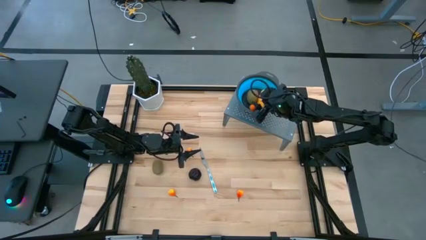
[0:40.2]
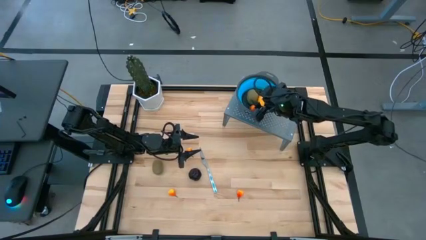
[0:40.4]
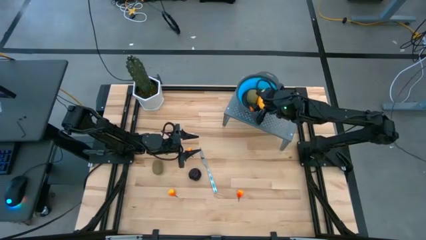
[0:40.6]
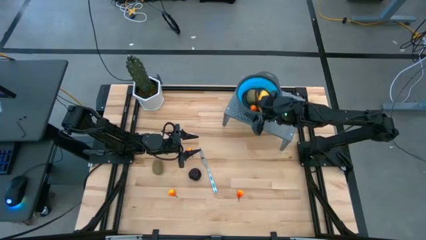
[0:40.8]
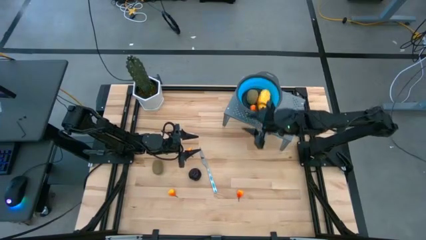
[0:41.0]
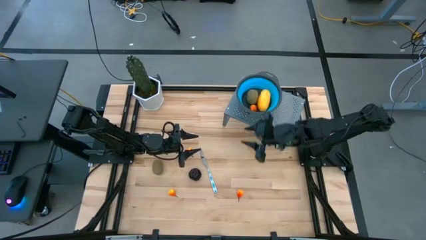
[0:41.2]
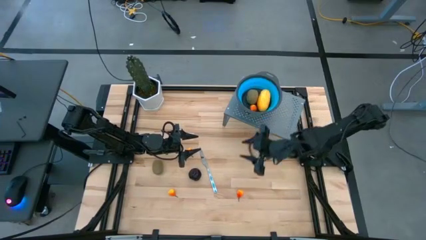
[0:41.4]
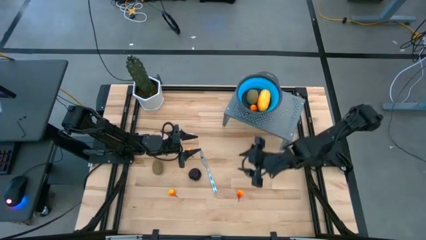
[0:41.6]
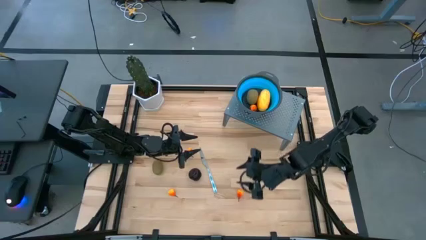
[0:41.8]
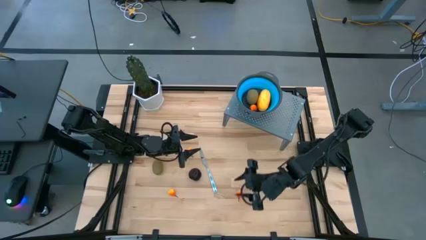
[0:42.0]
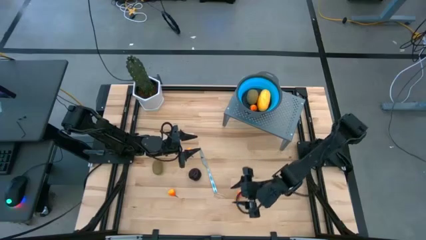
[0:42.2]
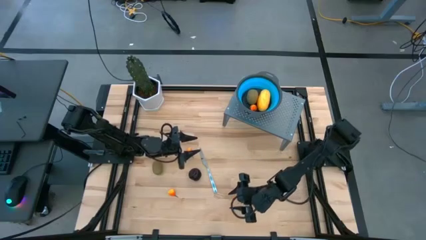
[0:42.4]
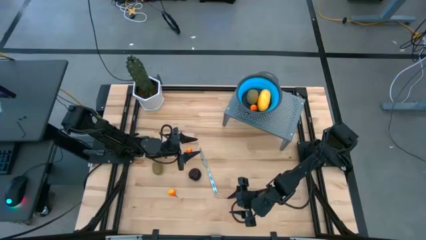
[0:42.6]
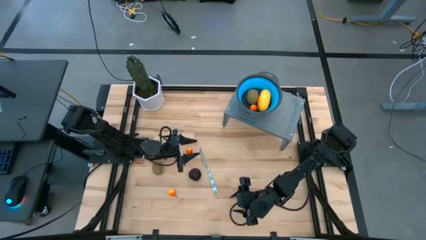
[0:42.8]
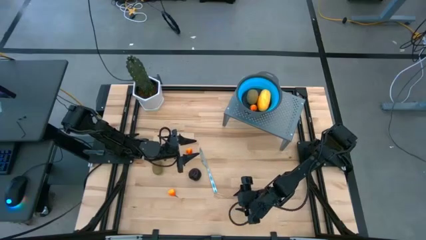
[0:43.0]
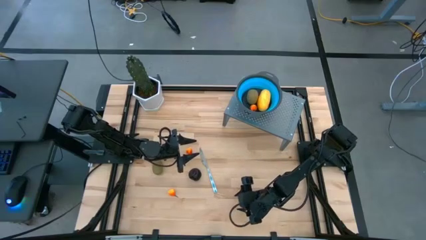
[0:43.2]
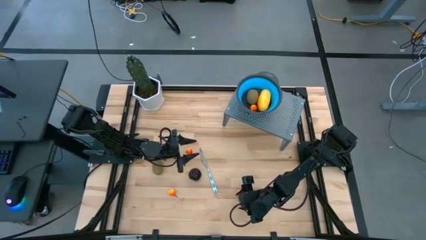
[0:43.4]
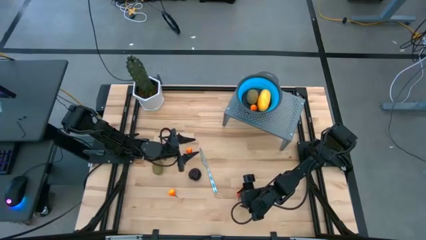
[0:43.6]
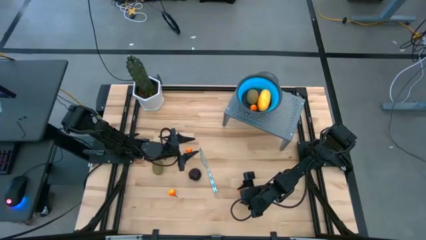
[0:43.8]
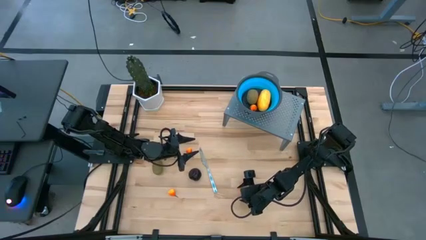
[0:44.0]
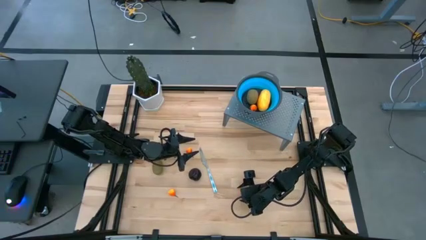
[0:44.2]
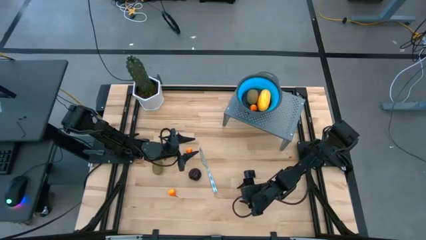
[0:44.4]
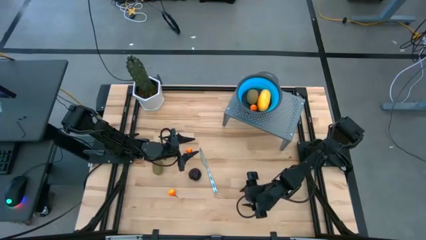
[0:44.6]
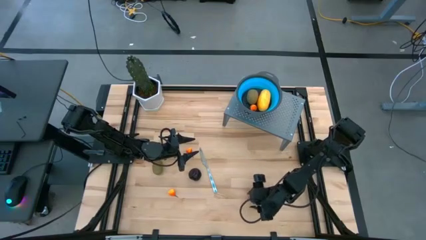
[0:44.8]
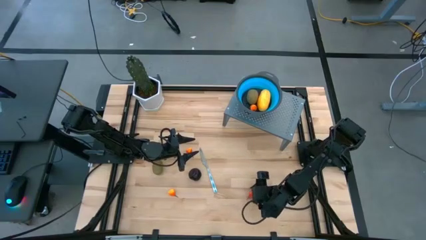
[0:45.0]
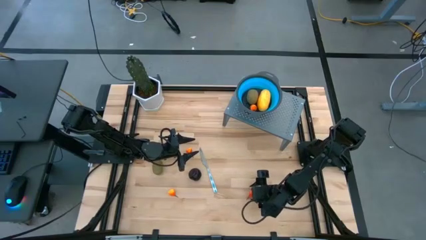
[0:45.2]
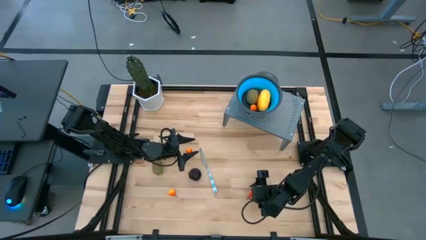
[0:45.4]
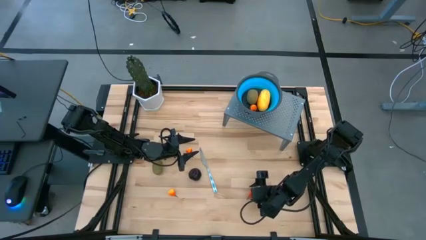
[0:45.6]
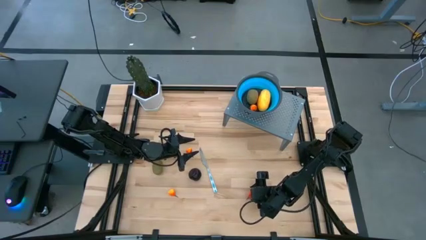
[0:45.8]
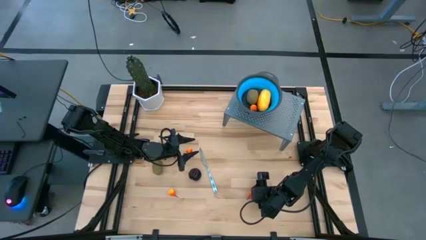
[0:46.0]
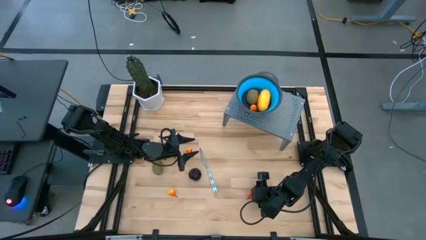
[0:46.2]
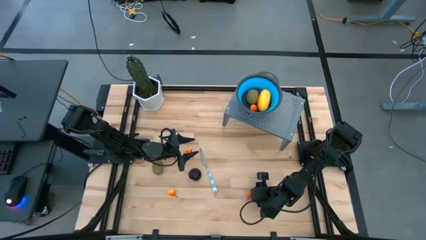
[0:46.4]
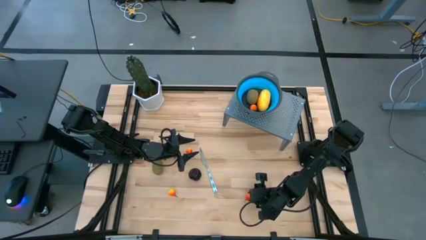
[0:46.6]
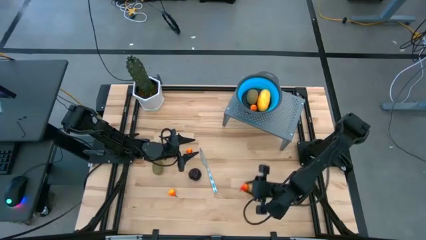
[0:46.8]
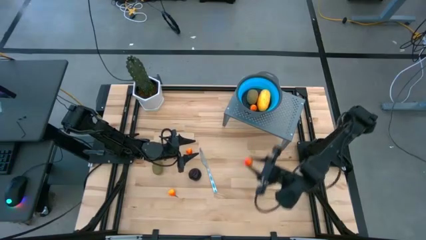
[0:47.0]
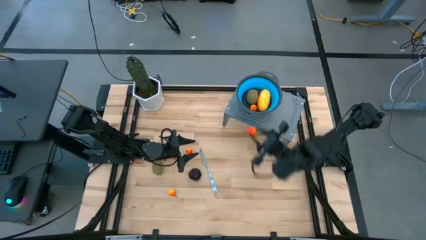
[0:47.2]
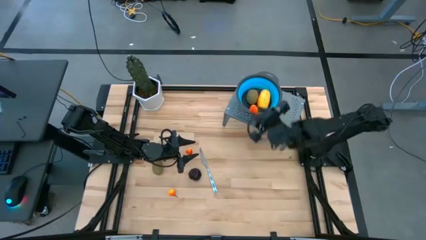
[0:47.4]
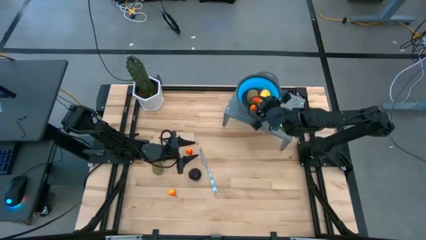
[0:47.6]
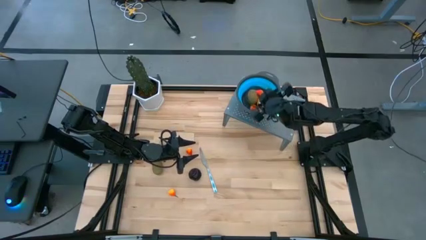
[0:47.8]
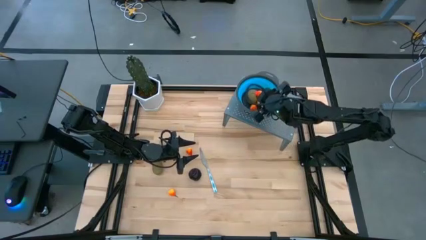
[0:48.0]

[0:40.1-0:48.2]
Task: Pick & Place Fruit
Put the orange peach in the blue strainer bowl on the shelf

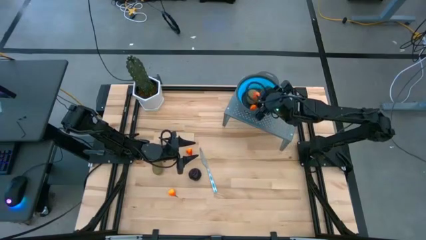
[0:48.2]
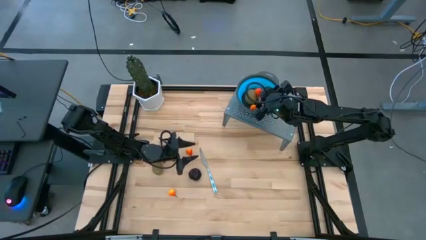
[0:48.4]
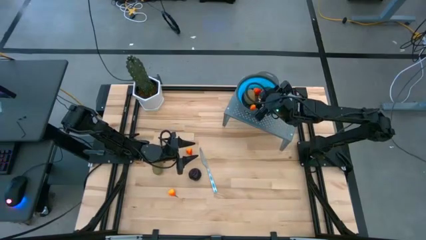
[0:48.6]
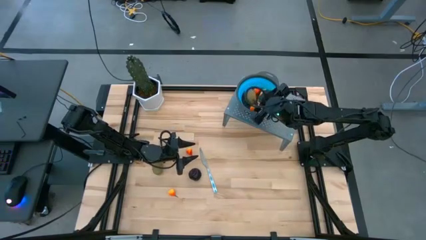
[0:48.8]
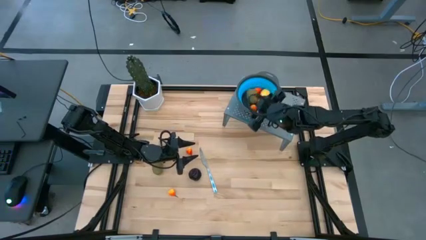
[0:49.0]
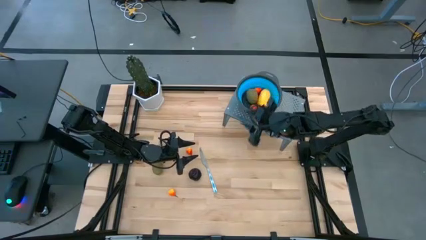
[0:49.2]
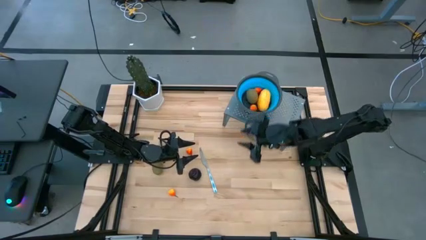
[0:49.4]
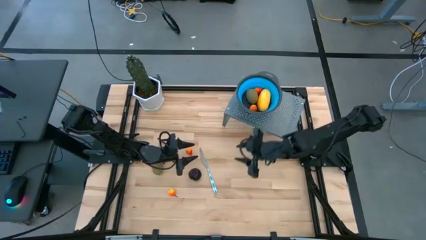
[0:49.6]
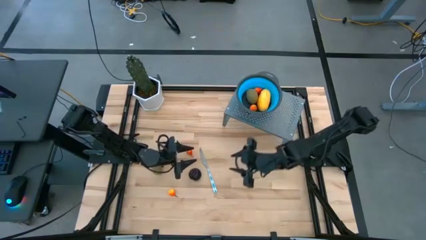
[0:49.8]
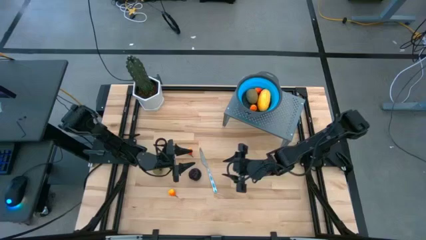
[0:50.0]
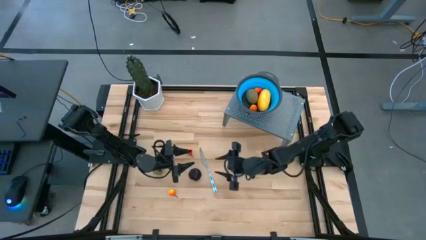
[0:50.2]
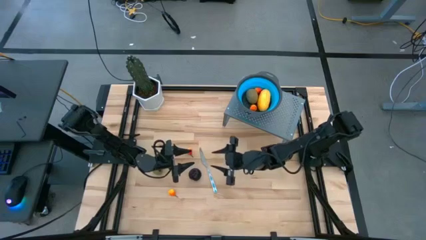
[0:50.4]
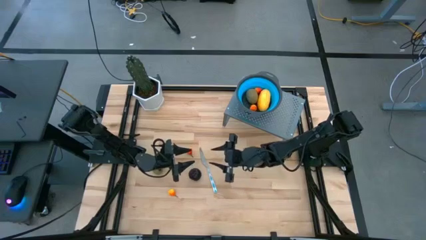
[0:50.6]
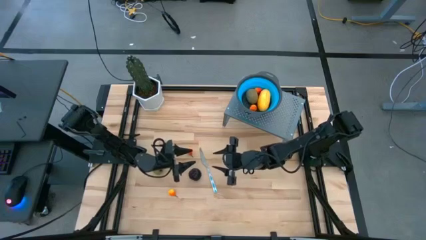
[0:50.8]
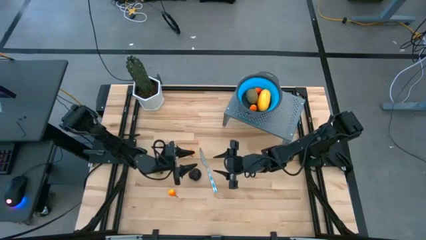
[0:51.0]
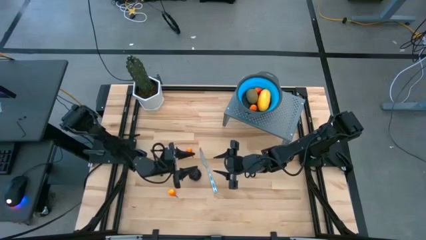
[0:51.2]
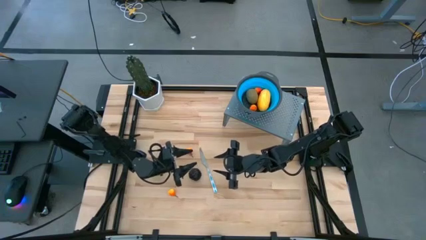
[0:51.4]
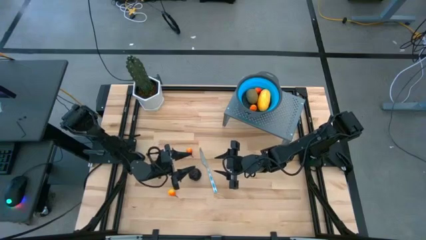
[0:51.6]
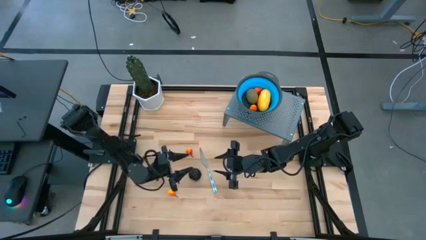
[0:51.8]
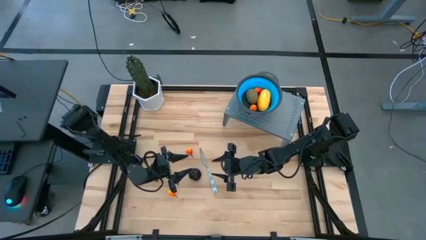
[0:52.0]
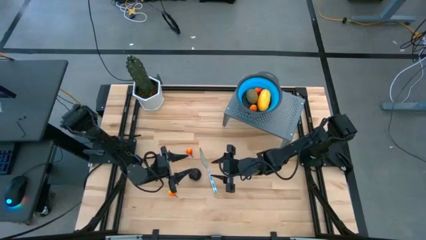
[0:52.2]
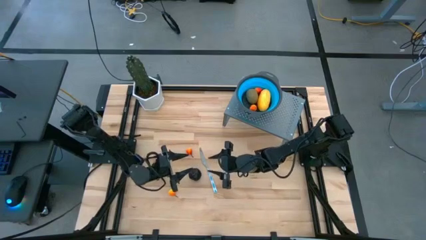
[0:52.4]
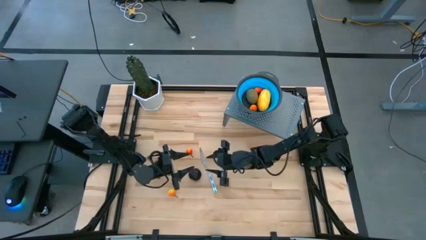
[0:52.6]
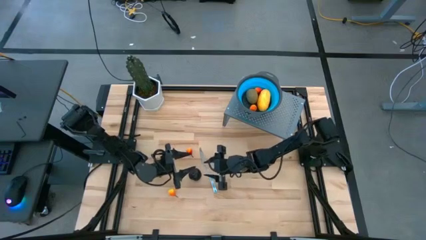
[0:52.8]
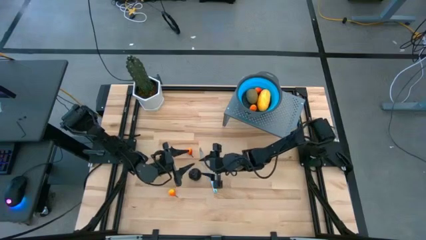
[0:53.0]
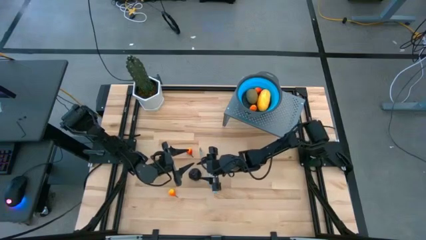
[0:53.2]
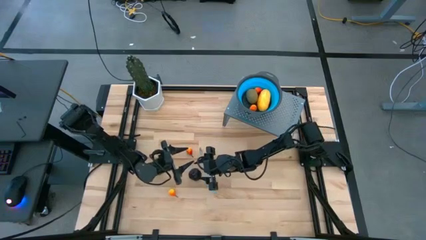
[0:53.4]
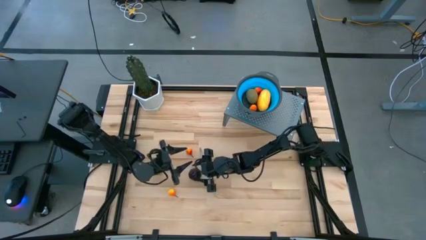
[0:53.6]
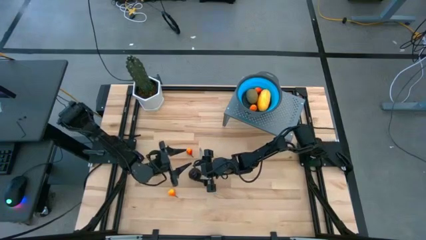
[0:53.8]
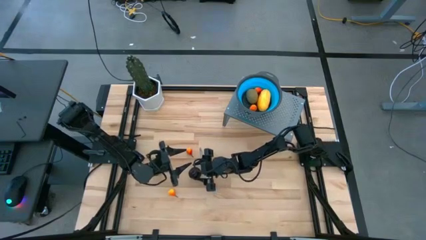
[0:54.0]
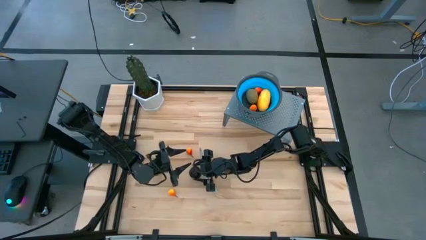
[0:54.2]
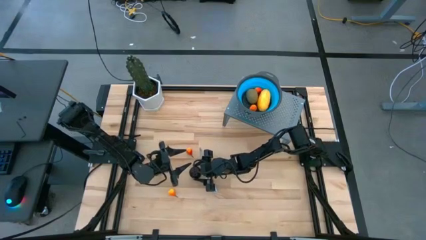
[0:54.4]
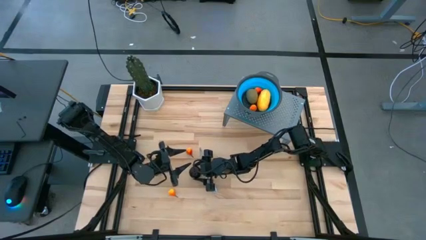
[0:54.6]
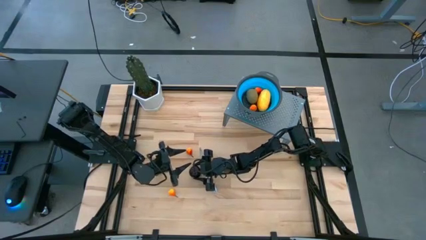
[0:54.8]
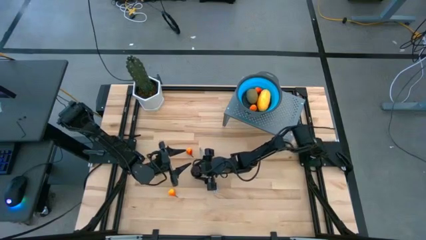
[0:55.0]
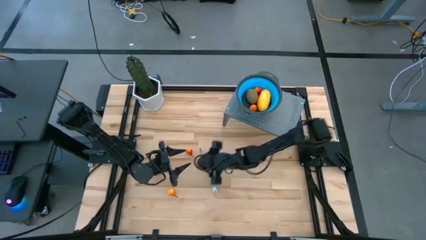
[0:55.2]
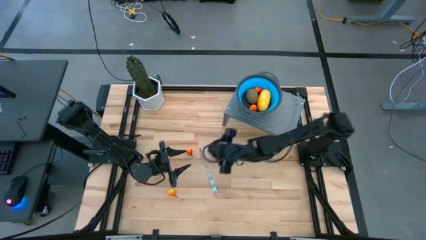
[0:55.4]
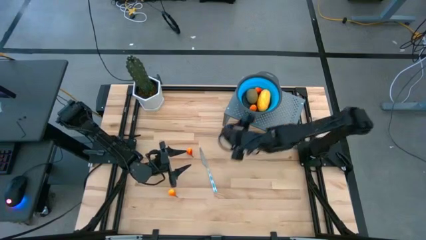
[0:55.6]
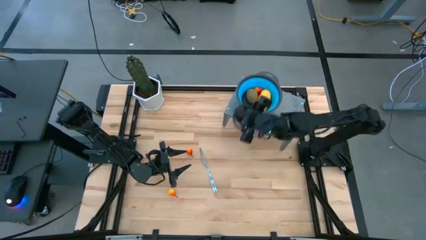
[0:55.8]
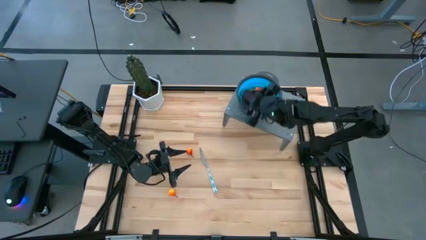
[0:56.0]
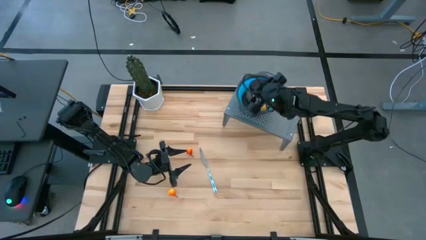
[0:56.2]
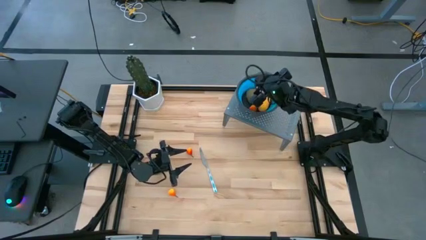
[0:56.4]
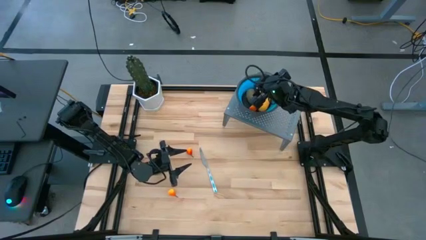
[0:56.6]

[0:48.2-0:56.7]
Put the violet plum in the blue strainer bowl on the shelf
